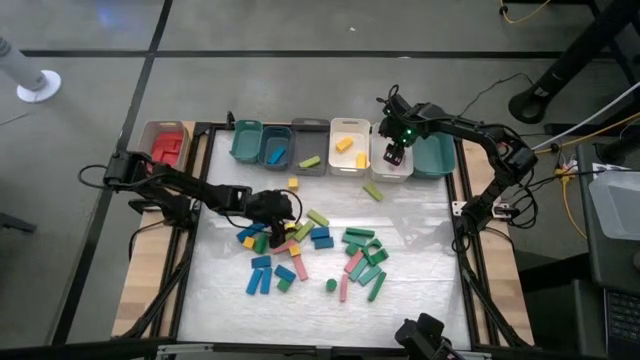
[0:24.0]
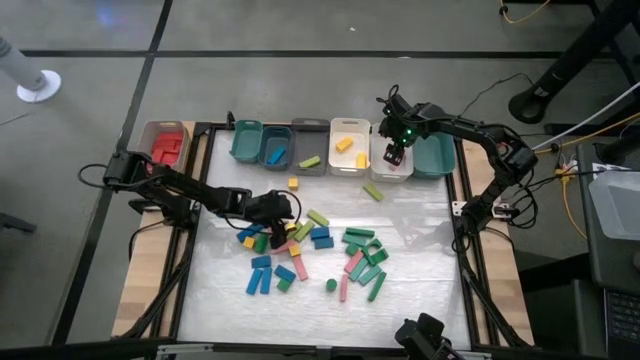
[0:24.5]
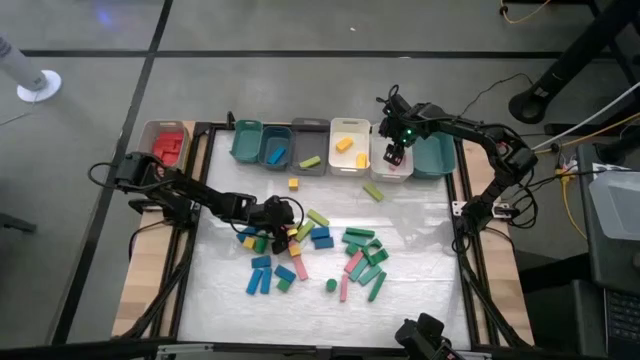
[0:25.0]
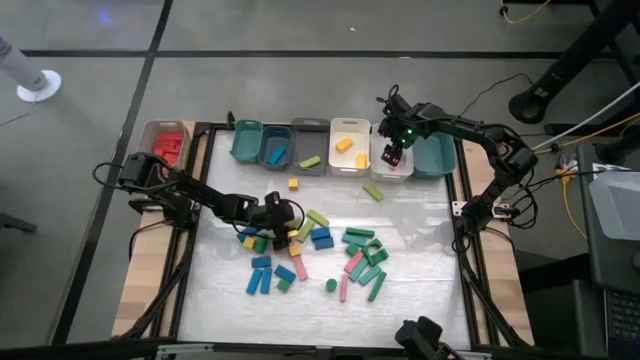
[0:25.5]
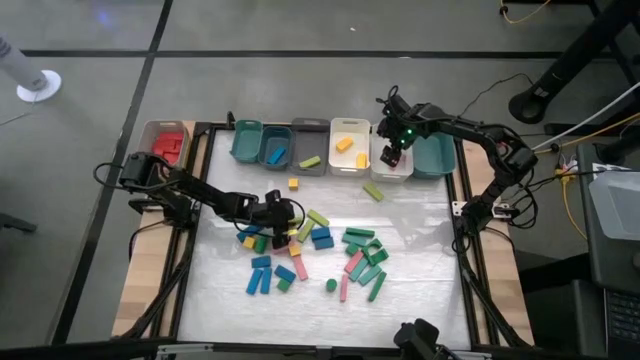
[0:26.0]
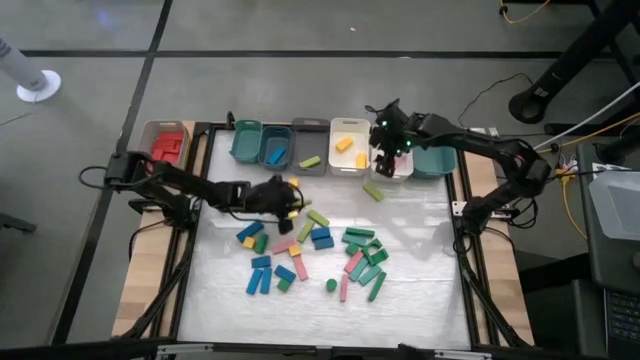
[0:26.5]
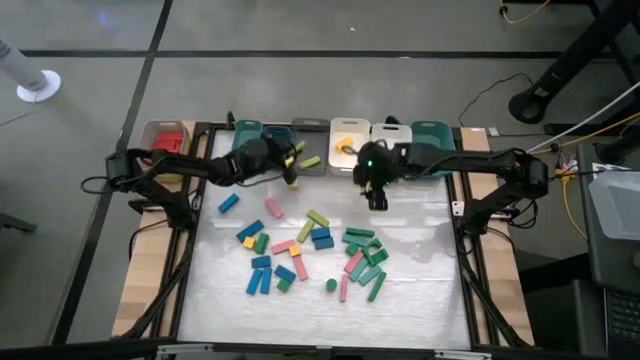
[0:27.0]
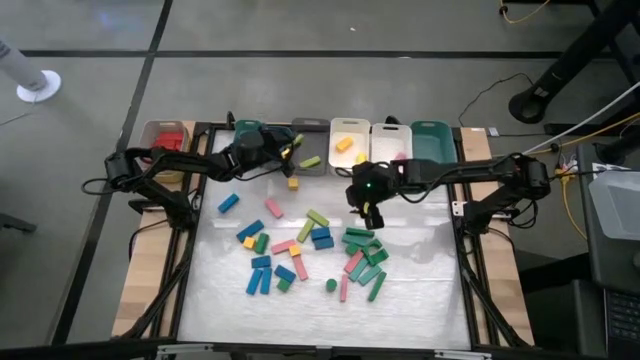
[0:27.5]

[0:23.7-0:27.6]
Task: Sort blocks
Put the light green block into the grey bin

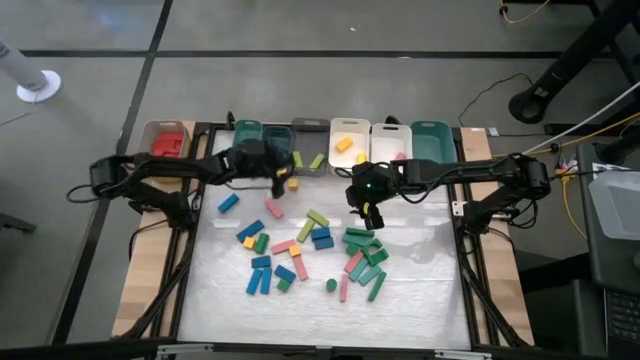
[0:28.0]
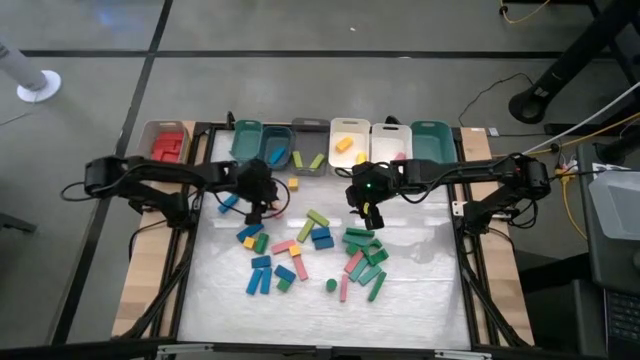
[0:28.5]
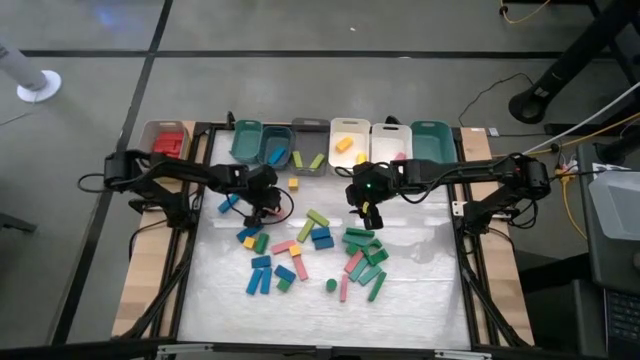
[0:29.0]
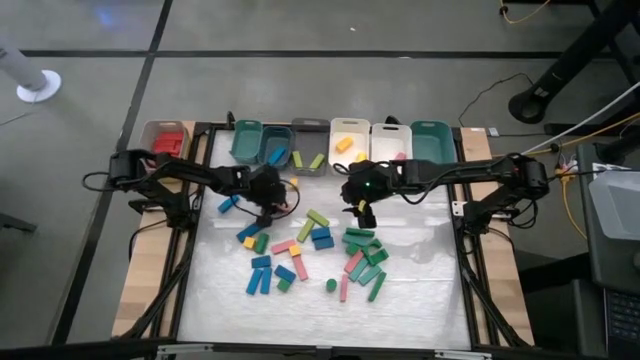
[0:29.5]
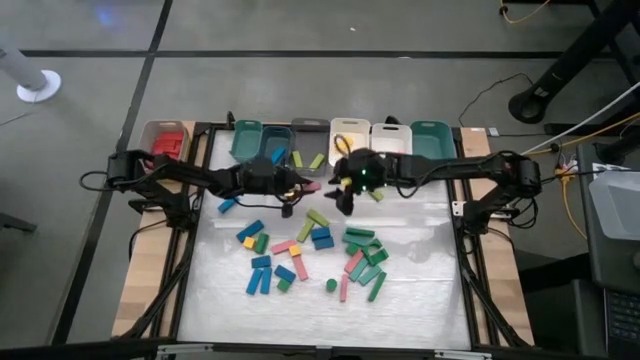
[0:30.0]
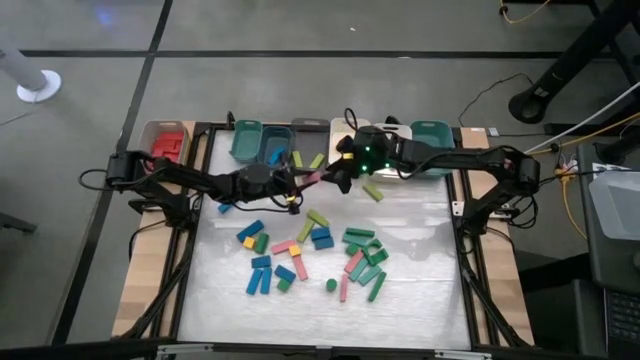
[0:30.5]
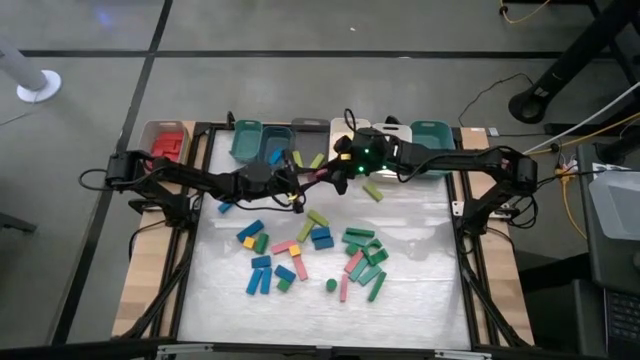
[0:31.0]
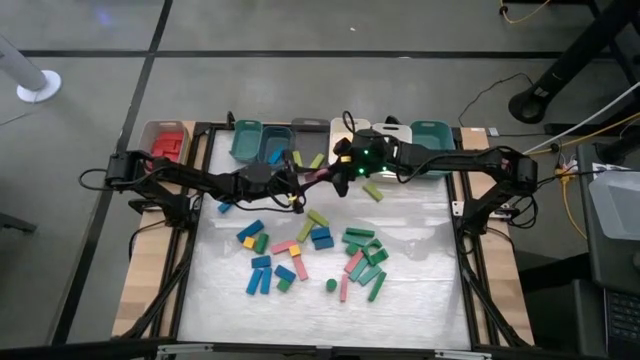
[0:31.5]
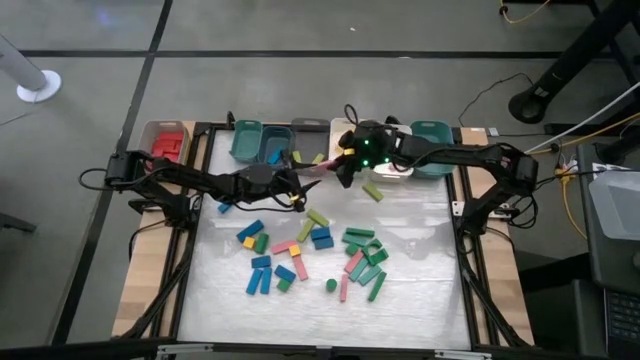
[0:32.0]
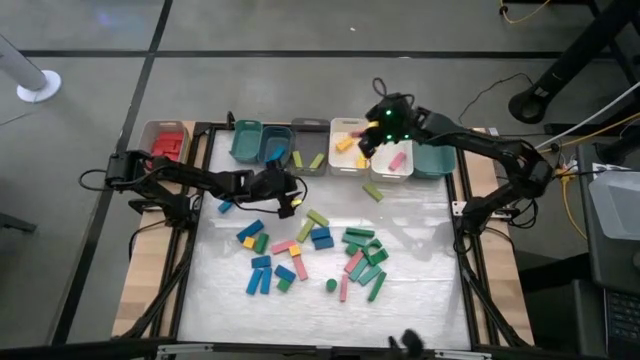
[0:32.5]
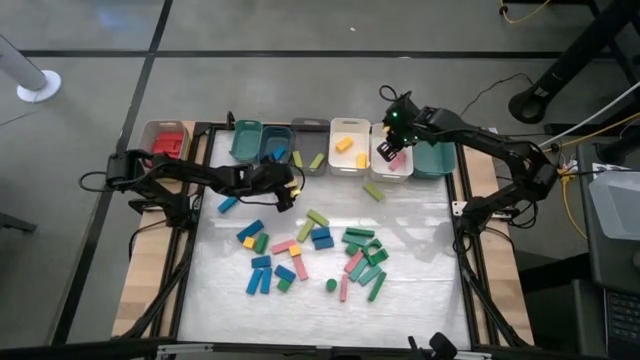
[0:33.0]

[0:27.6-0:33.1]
Put the pink block into the right white bin

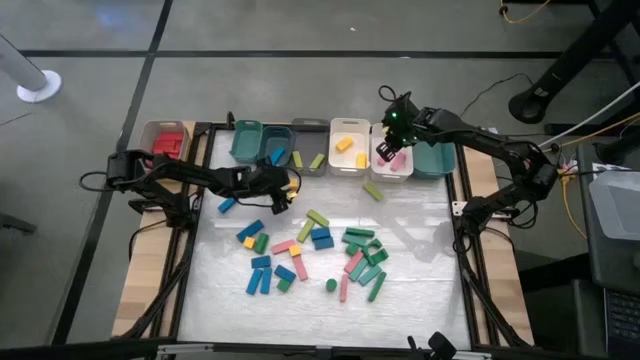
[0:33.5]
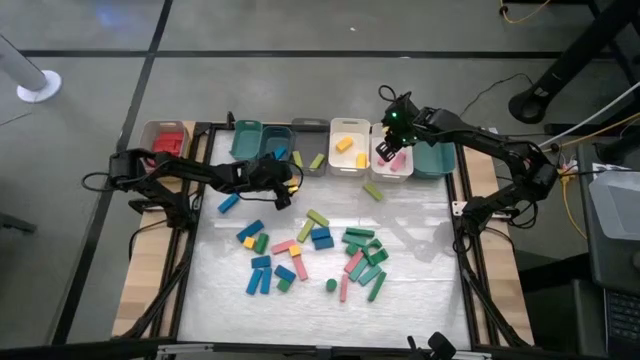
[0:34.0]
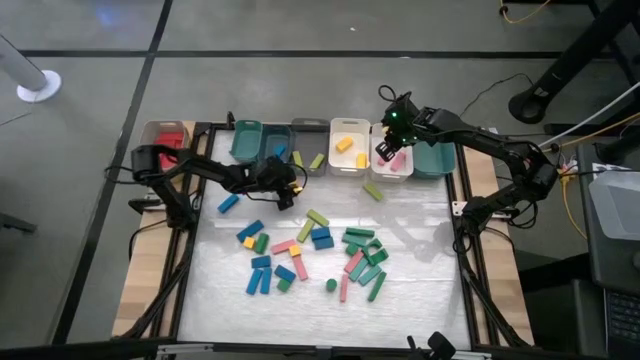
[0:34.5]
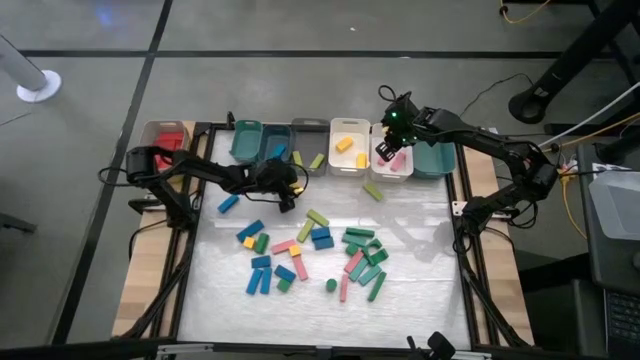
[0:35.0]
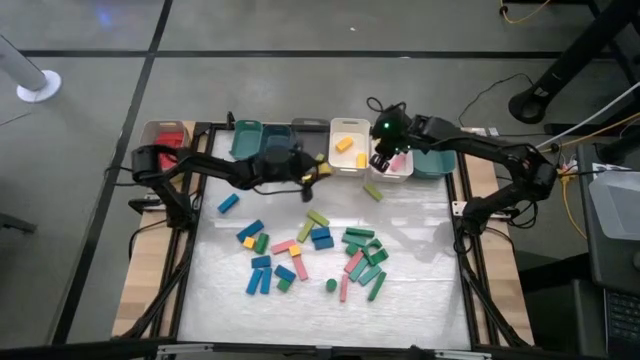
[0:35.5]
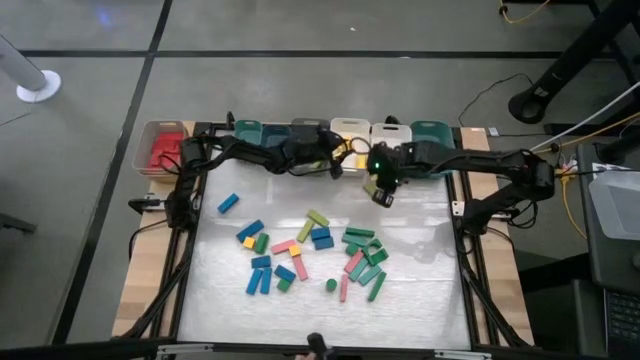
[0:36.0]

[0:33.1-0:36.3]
Put the yellow block into the left white bin

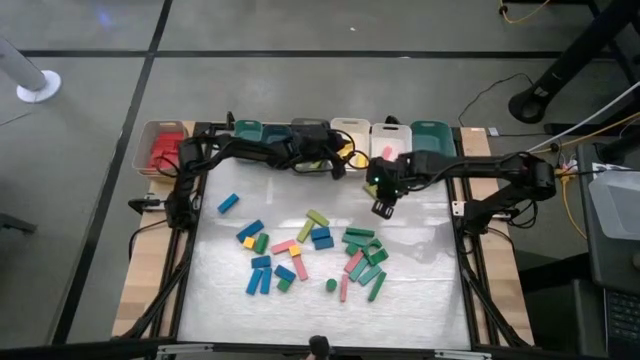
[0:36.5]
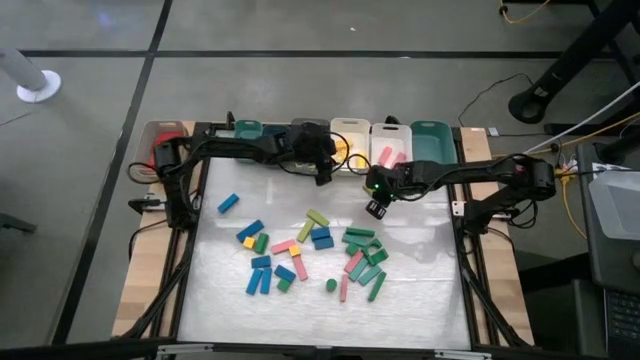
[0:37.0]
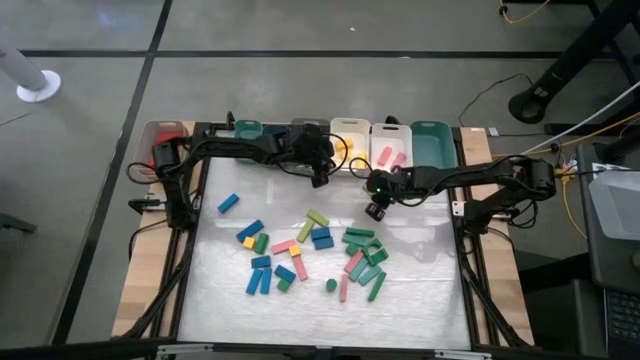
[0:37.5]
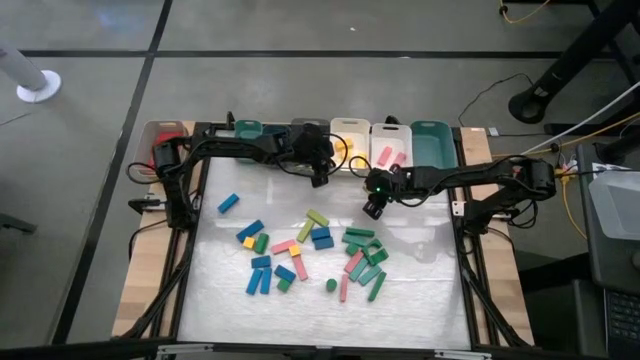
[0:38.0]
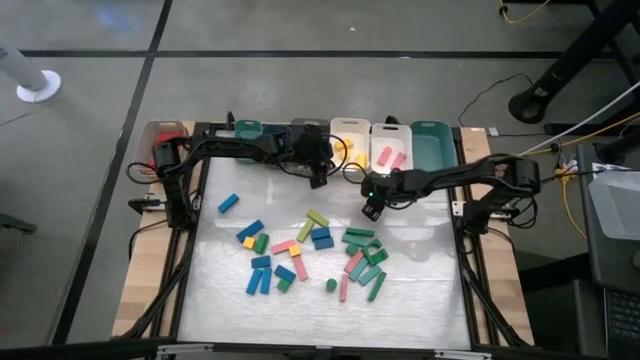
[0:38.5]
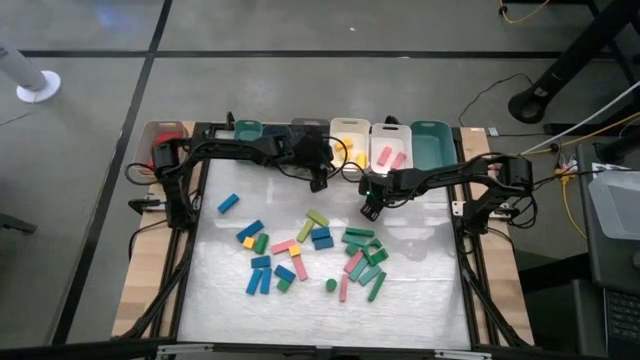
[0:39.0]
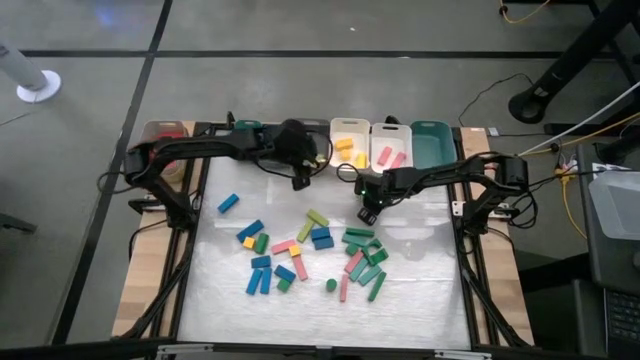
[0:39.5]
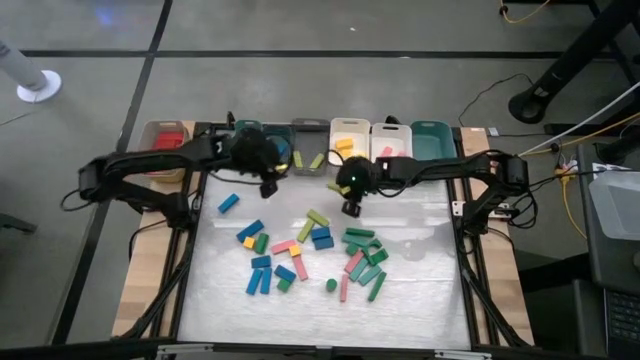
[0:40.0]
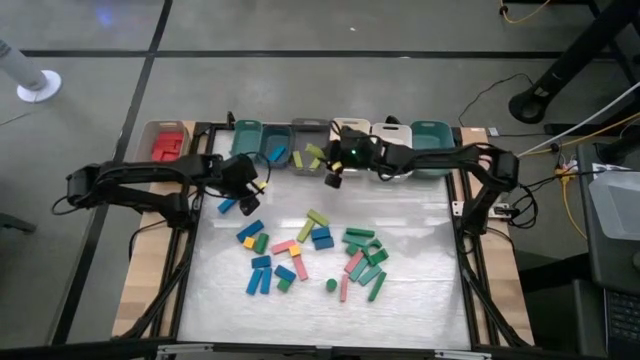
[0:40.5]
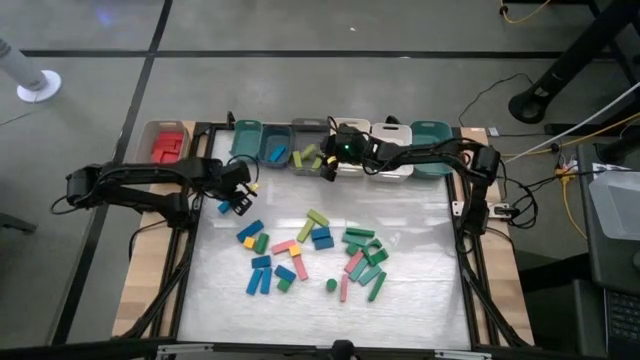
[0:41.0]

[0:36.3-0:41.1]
Put the light green block into the grey bin

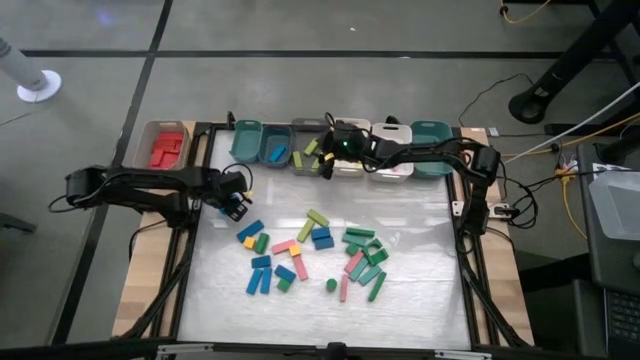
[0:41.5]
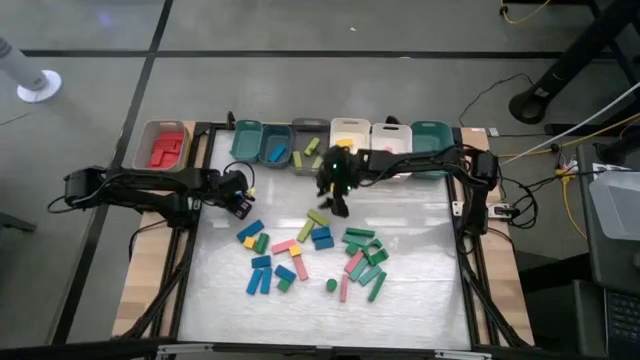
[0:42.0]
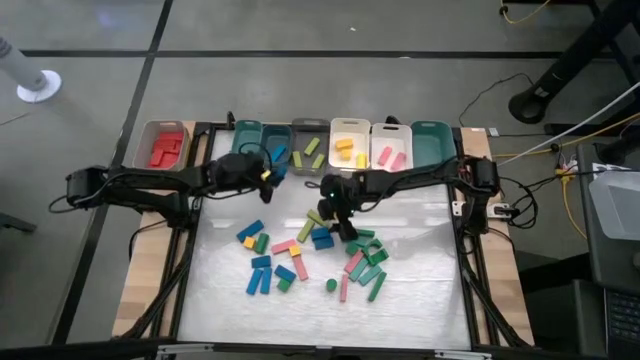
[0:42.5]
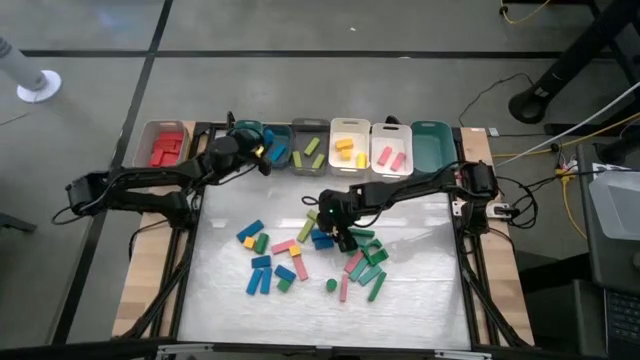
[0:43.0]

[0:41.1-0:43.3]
Put the blue block into the blue bin

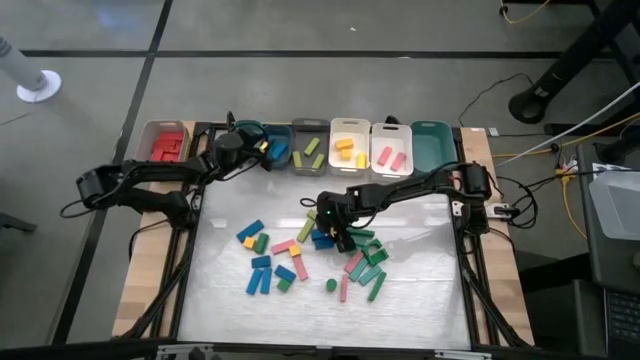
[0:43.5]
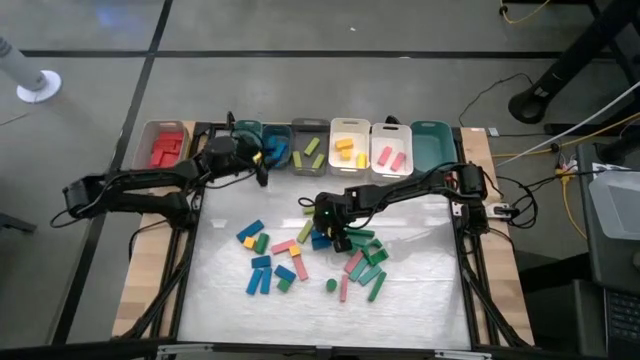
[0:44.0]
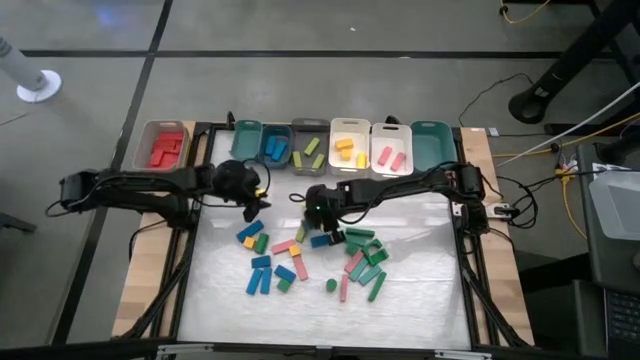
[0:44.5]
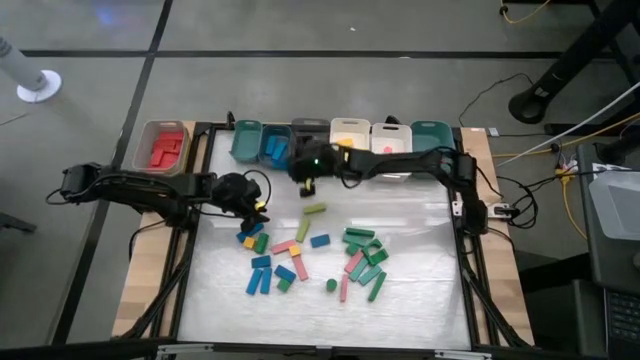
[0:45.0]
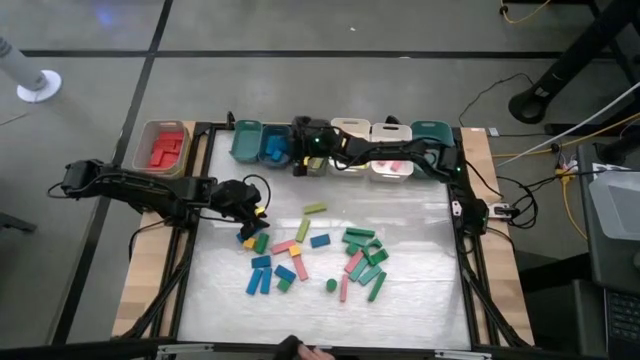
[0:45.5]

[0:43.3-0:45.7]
Put the blue block into the blue bin
